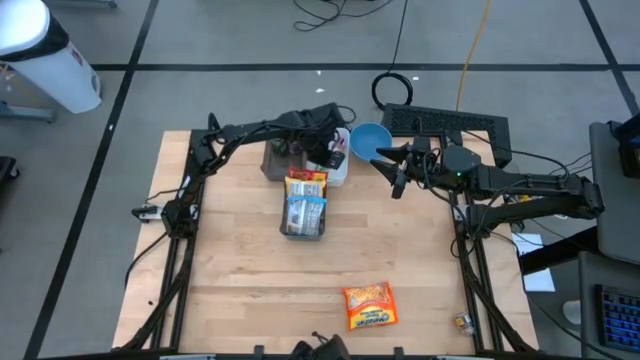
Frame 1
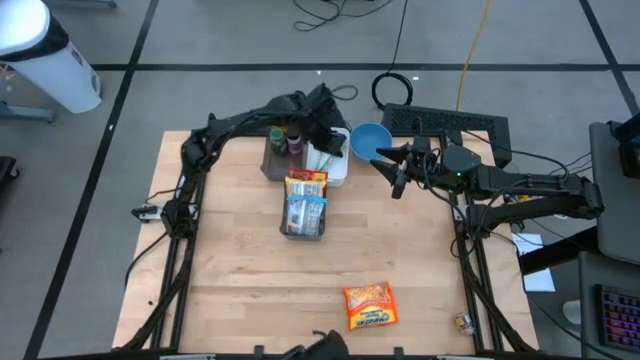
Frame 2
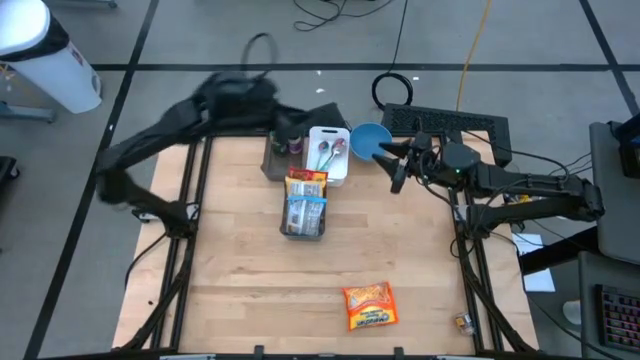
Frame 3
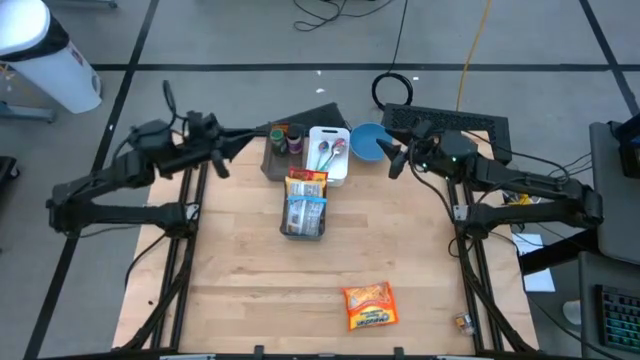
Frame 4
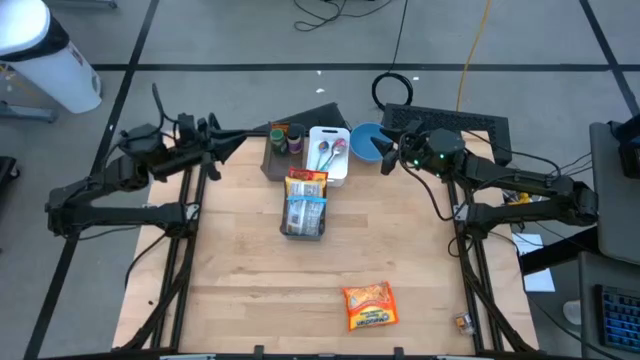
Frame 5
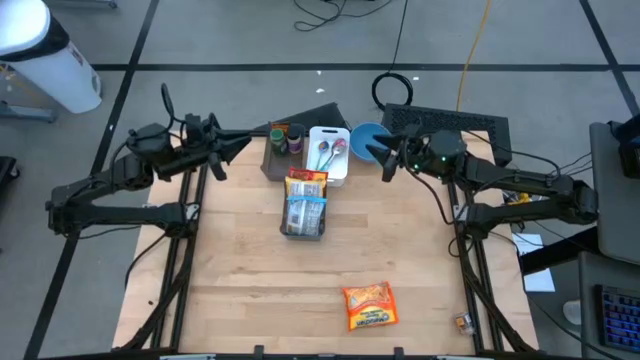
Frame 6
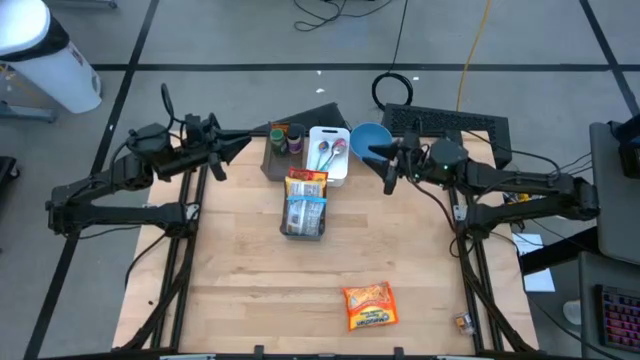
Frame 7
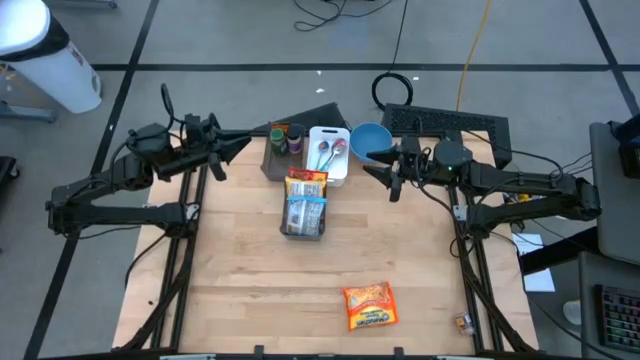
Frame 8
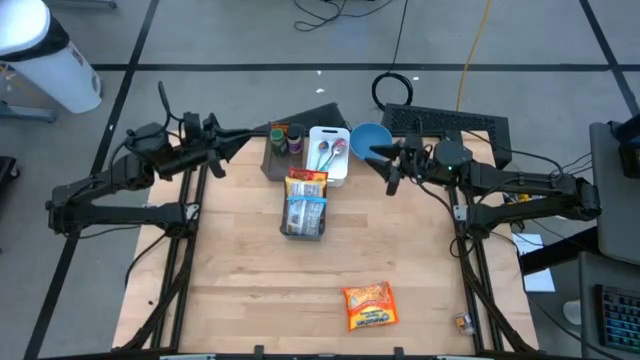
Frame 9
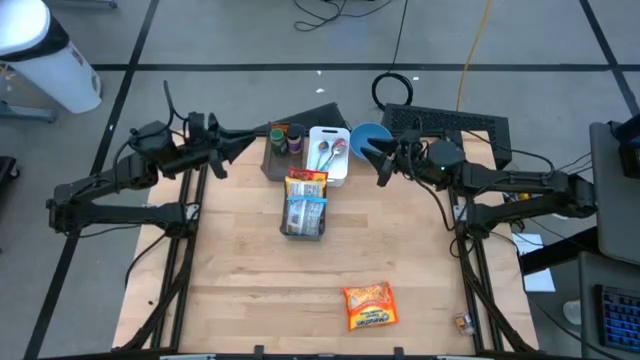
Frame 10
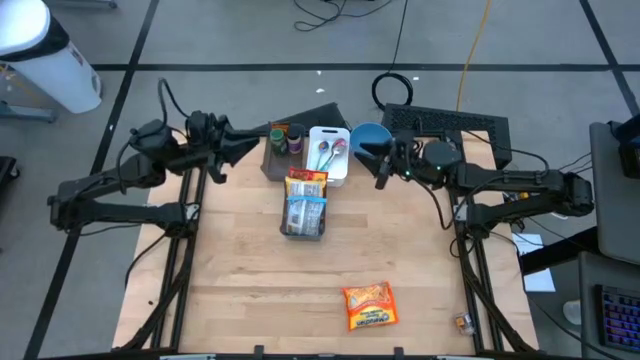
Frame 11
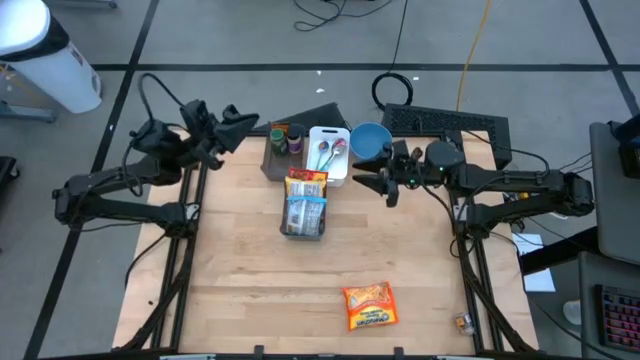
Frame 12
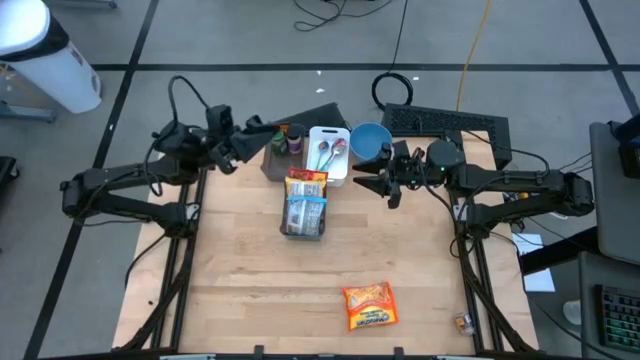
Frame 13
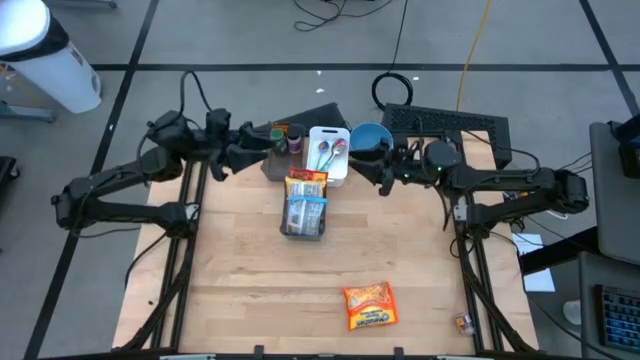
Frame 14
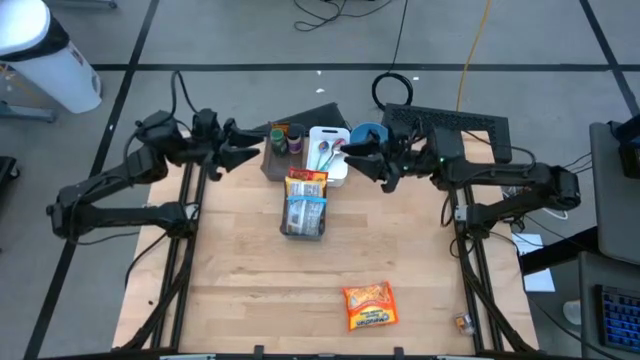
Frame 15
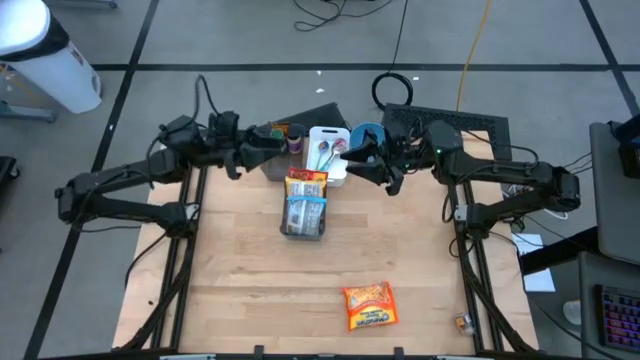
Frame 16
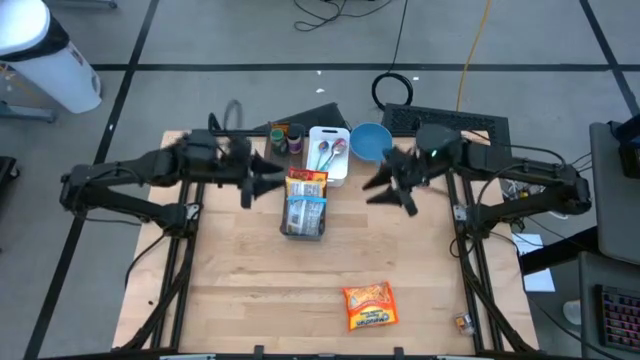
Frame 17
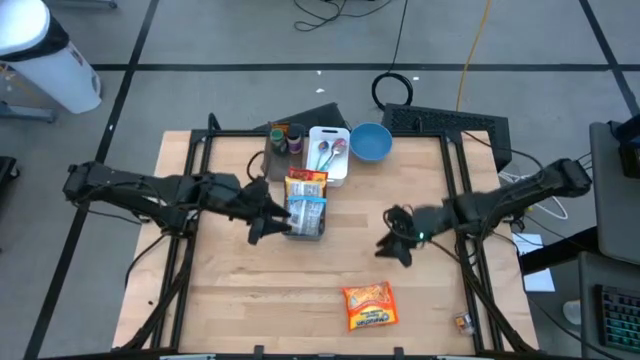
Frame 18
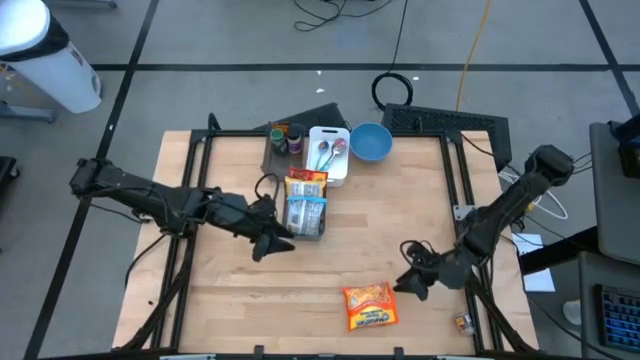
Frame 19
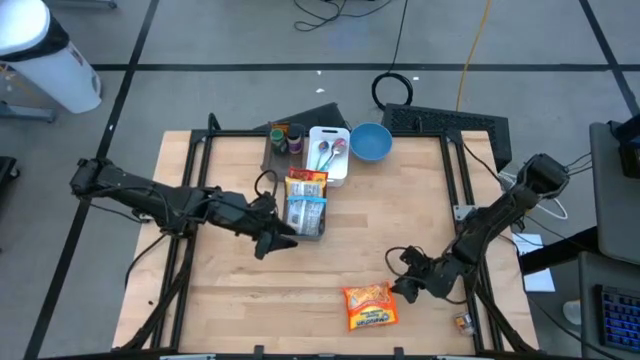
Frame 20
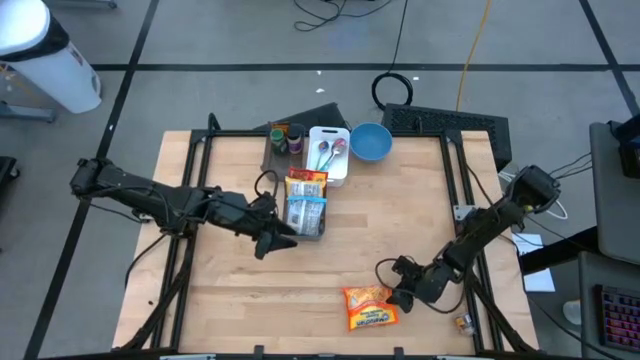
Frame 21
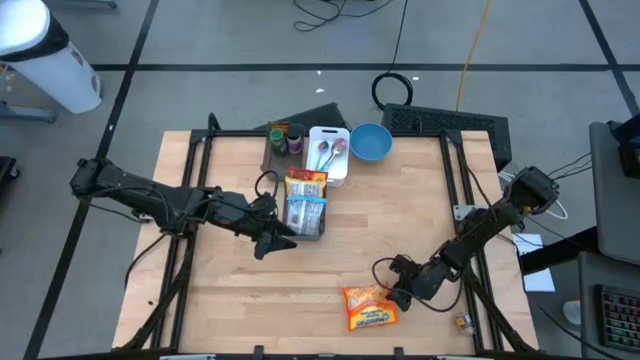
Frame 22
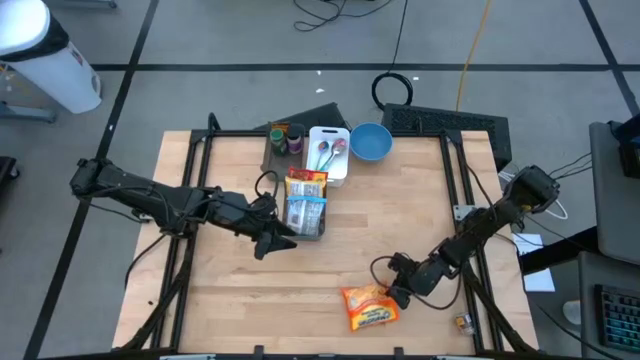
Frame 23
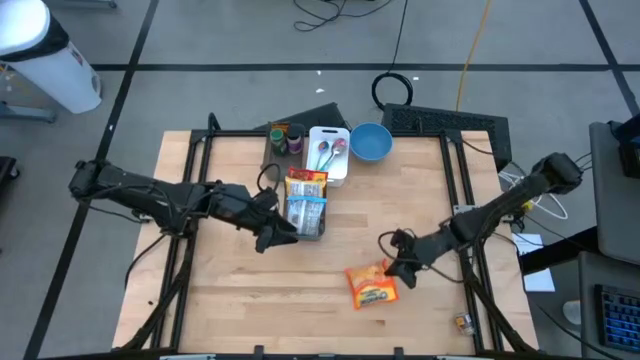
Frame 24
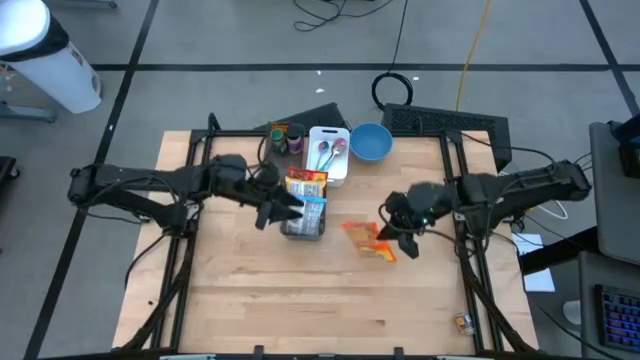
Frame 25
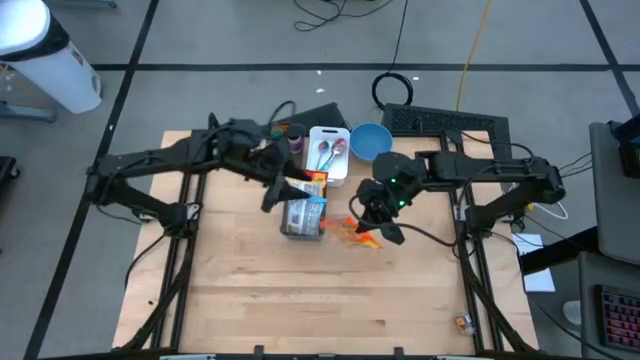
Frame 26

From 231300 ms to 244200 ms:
Task: Pick & Place Food Item
Put the orange noodle pack into the bottom black bin

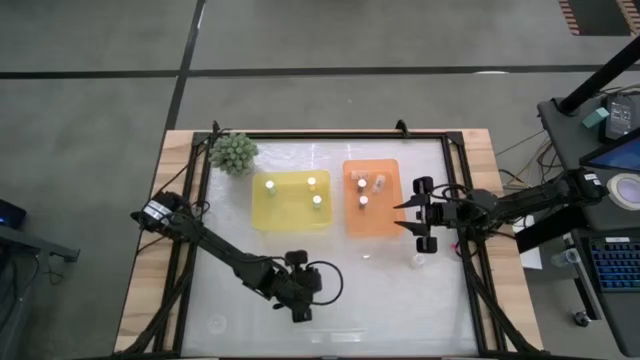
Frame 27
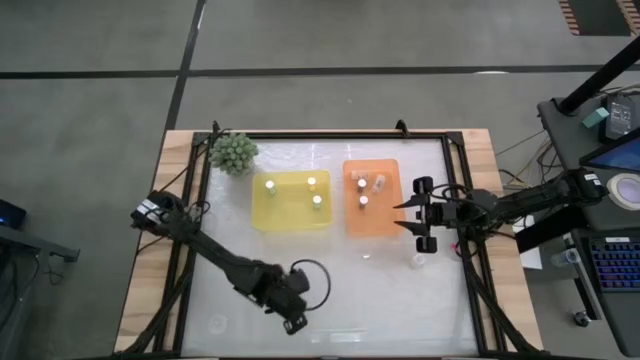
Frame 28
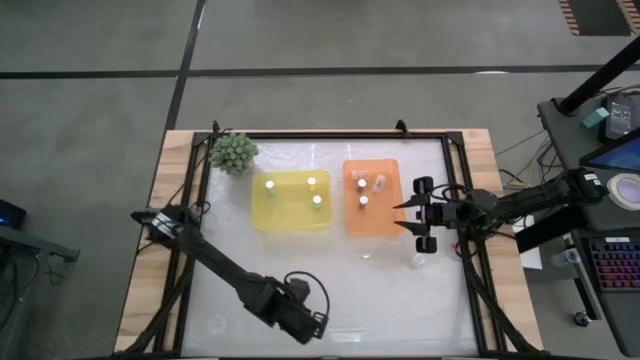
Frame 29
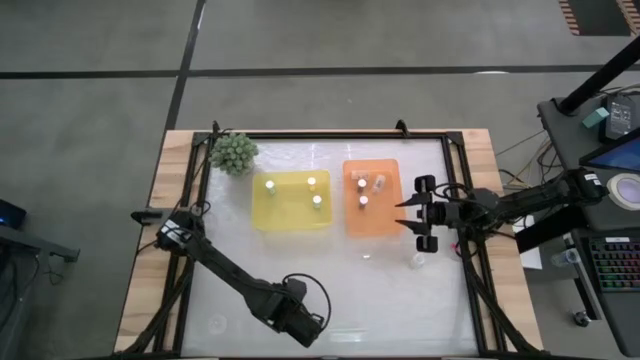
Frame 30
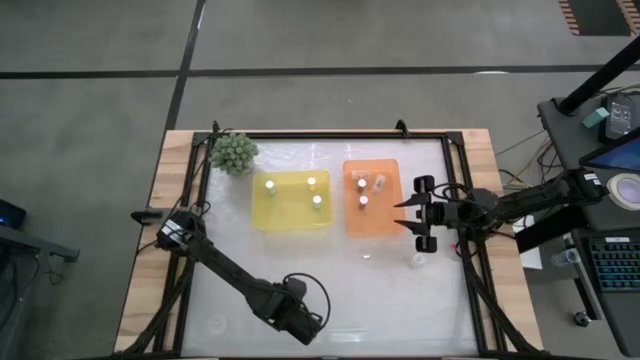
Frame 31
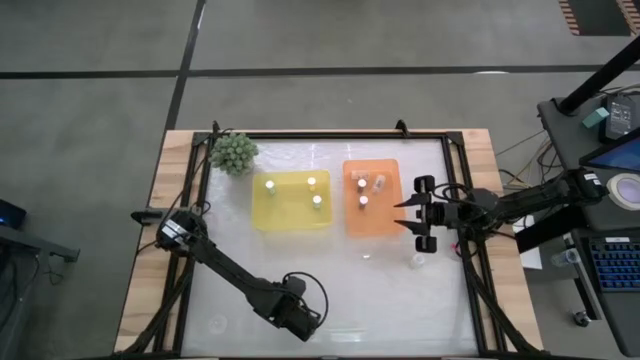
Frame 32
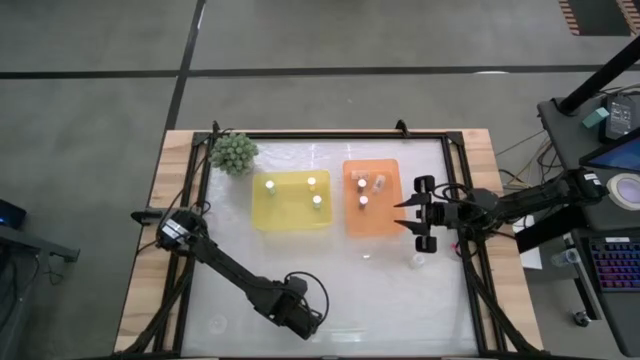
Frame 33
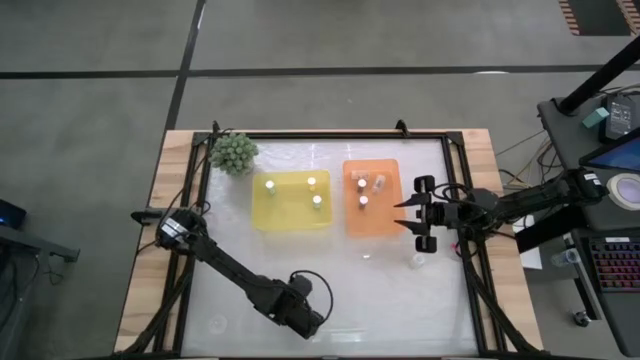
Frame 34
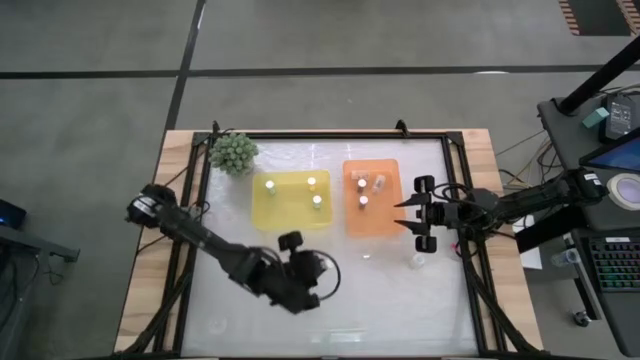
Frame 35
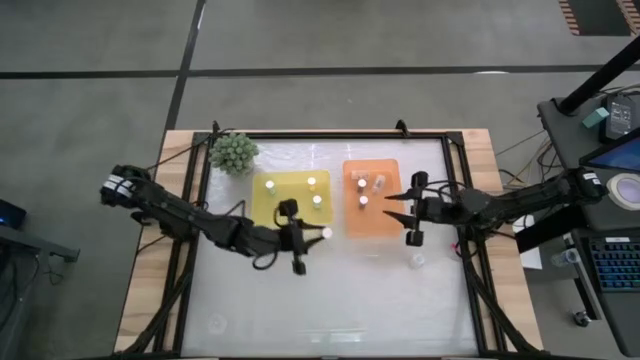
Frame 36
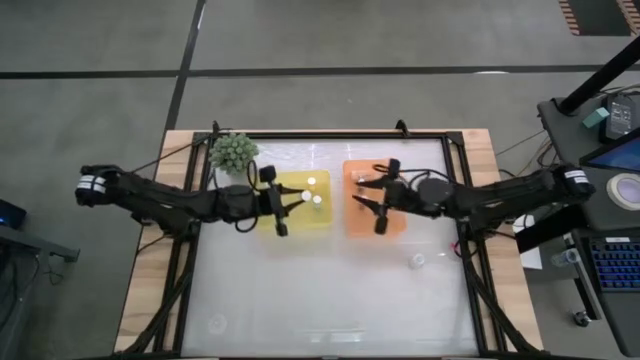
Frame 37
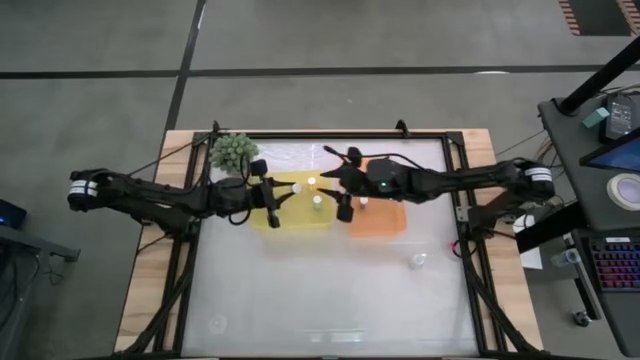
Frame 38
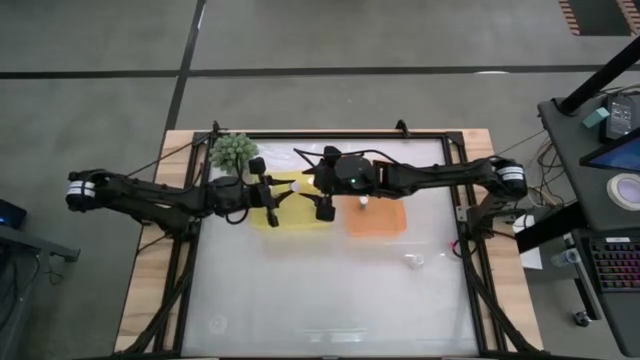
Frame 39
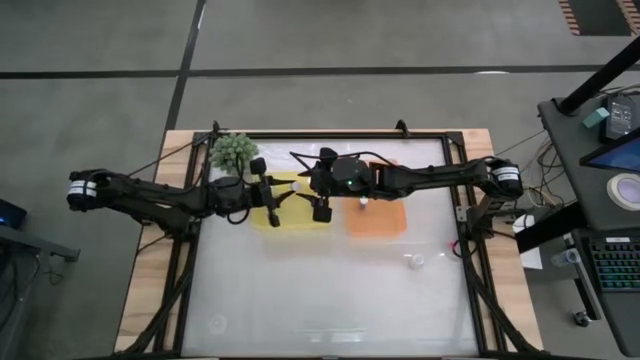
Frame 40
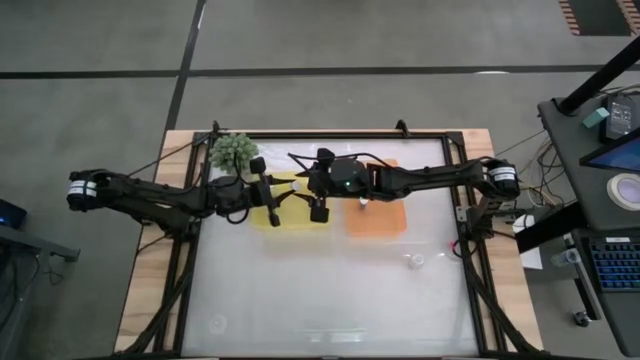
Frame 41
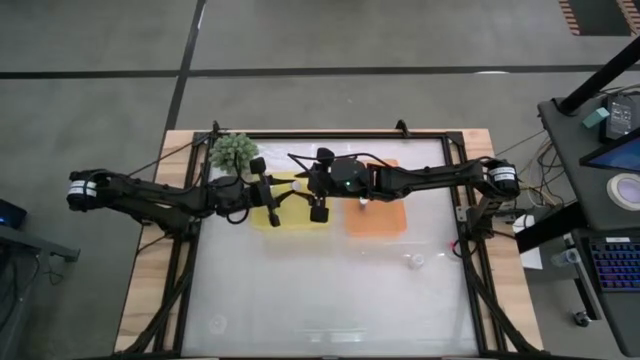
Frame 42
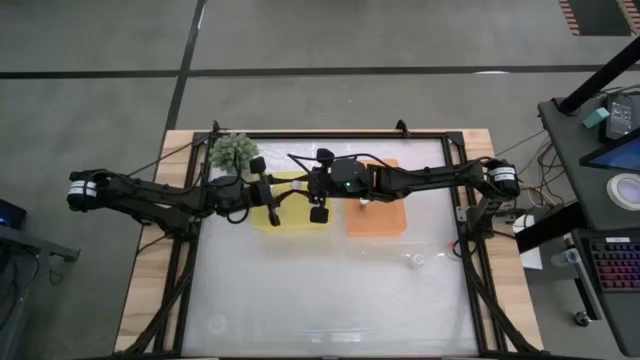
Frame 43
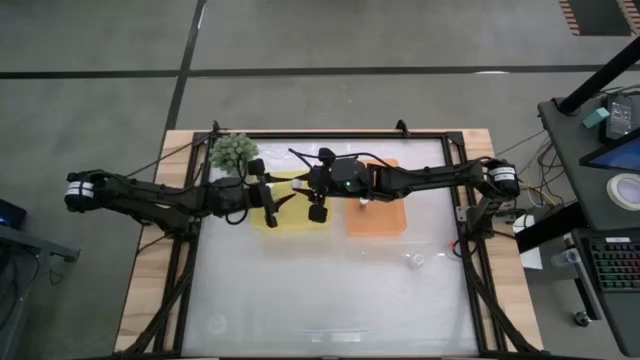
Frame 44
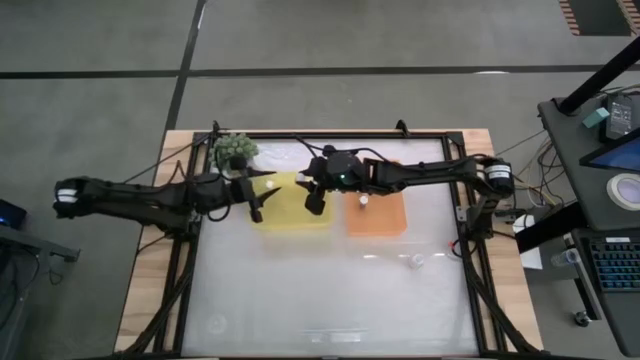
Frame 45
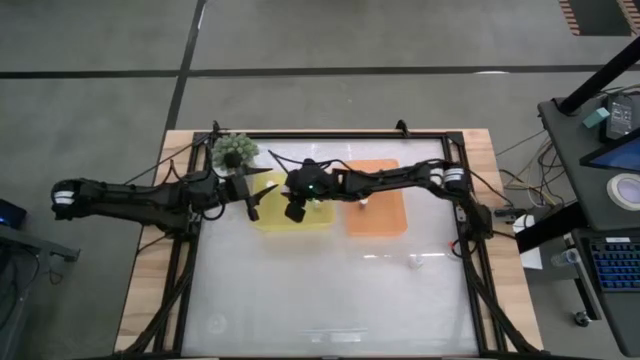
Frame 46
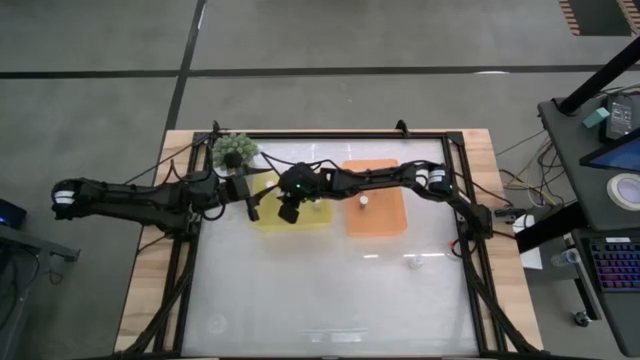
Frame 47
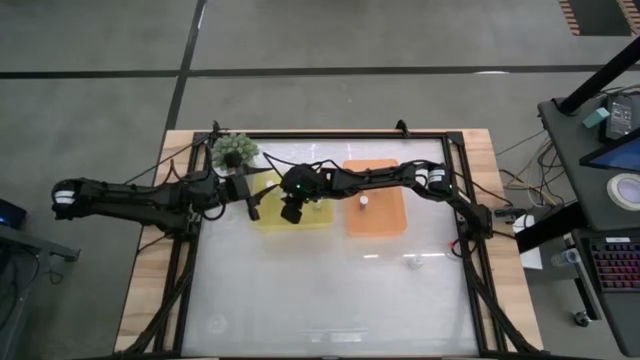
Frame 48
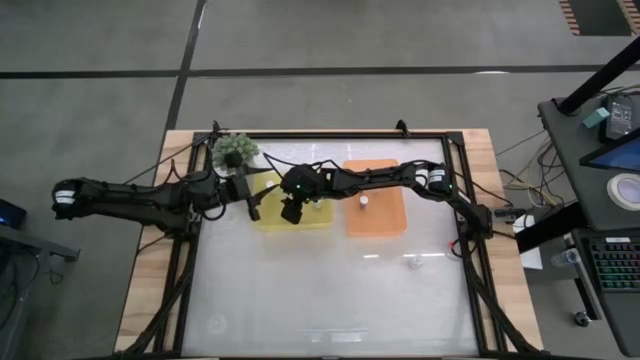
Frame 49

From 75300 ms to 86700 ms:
Task: Pick and place medicine bottles into bin by pill shape (circle, oval)
Put the yellow pill bottle into the yellow bin
